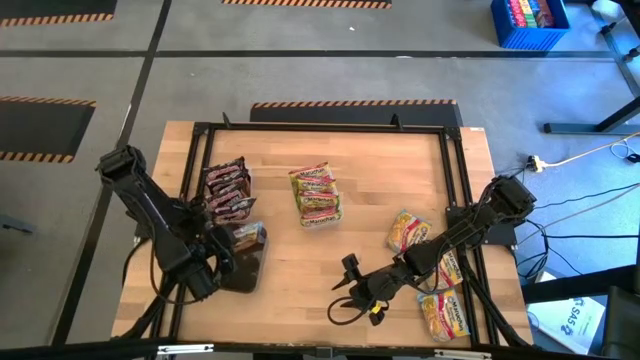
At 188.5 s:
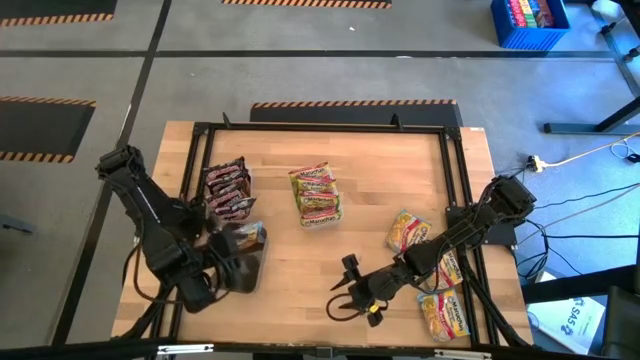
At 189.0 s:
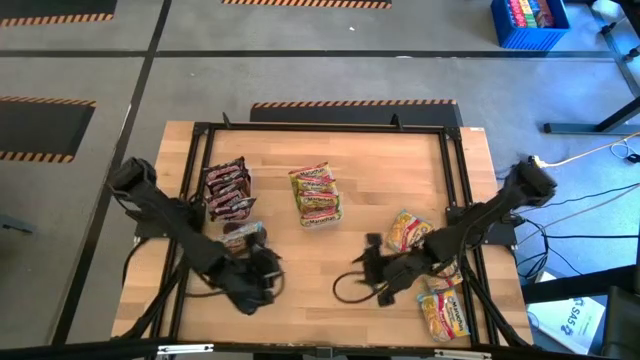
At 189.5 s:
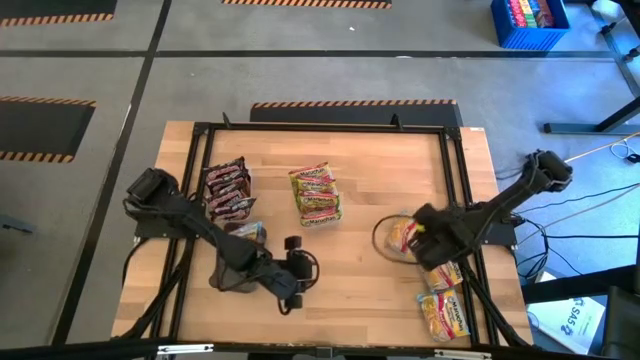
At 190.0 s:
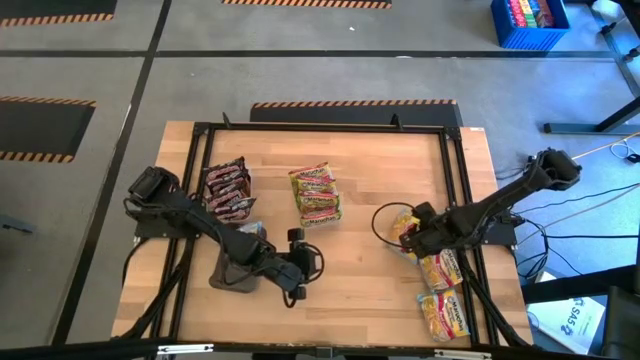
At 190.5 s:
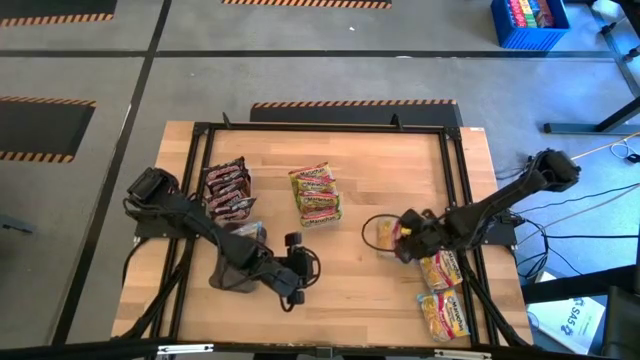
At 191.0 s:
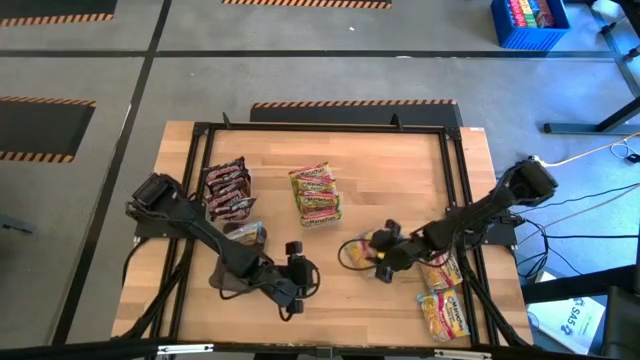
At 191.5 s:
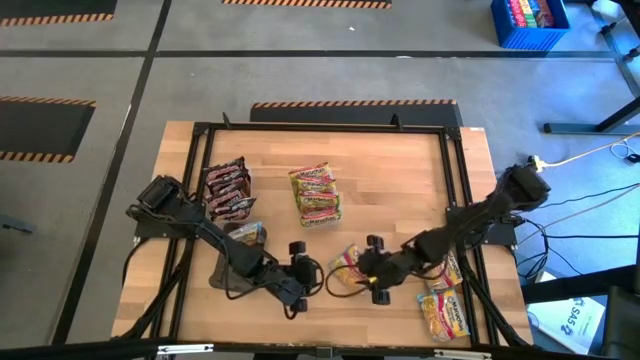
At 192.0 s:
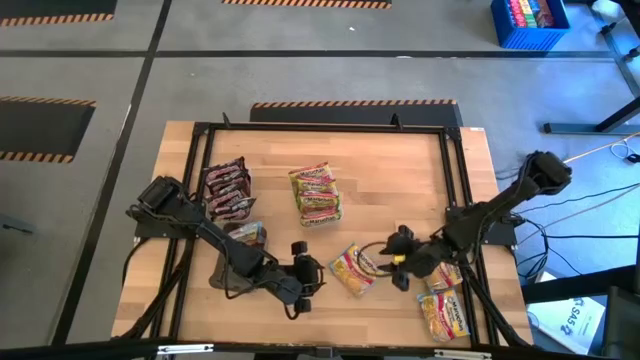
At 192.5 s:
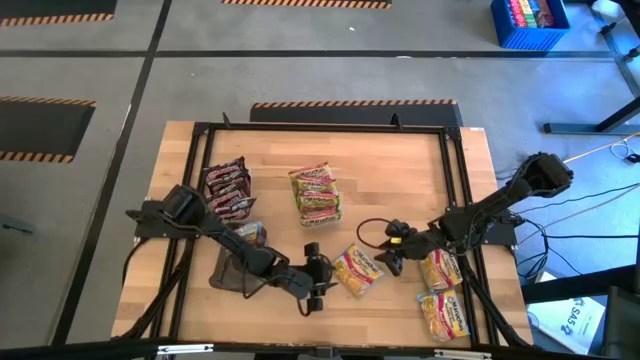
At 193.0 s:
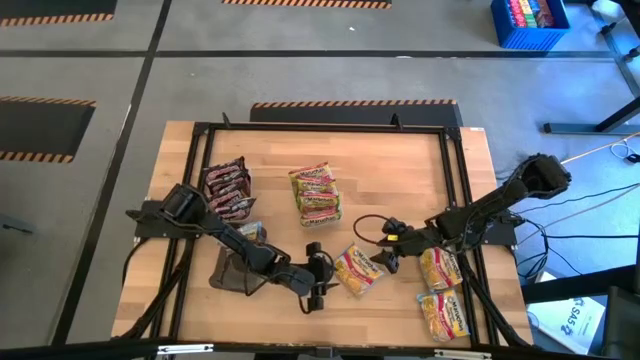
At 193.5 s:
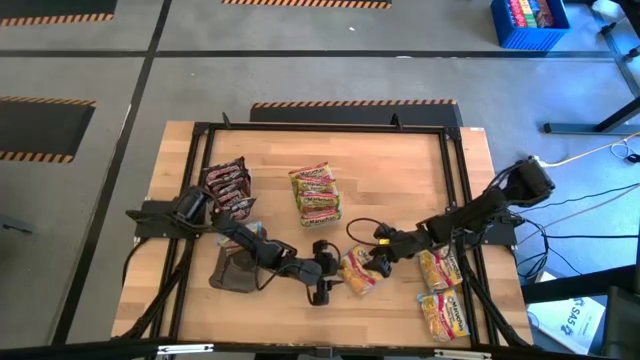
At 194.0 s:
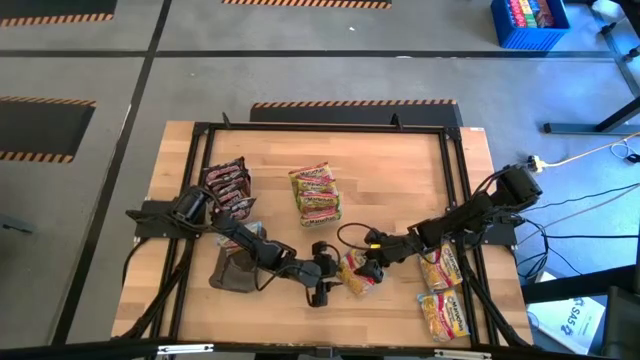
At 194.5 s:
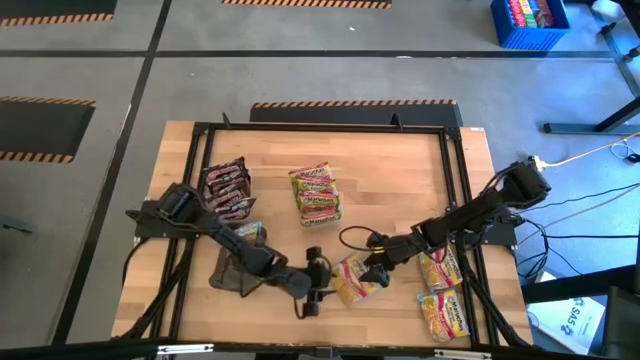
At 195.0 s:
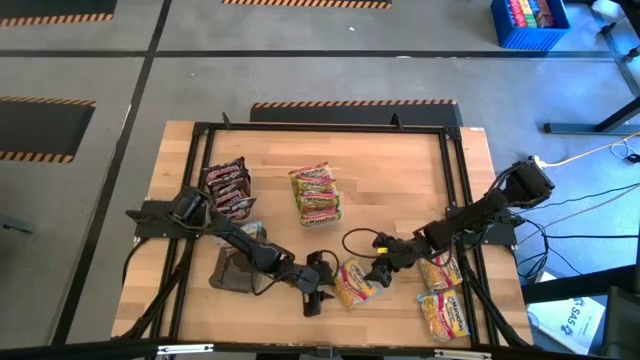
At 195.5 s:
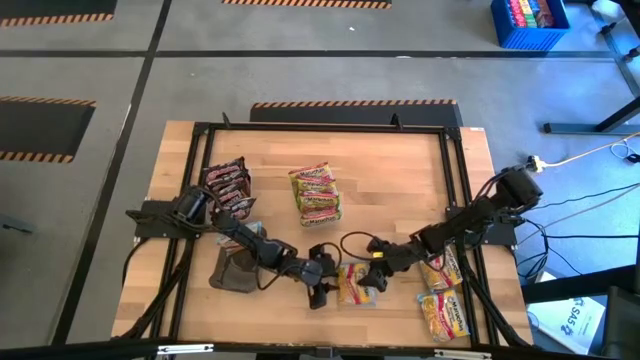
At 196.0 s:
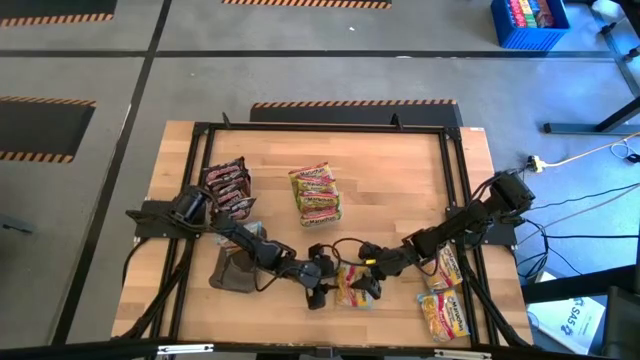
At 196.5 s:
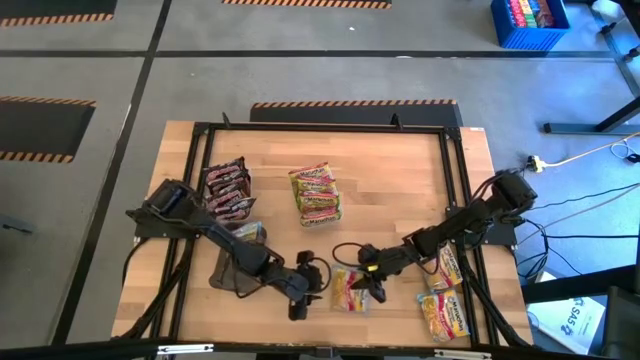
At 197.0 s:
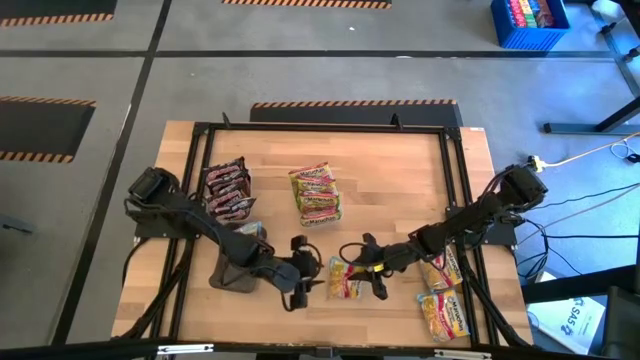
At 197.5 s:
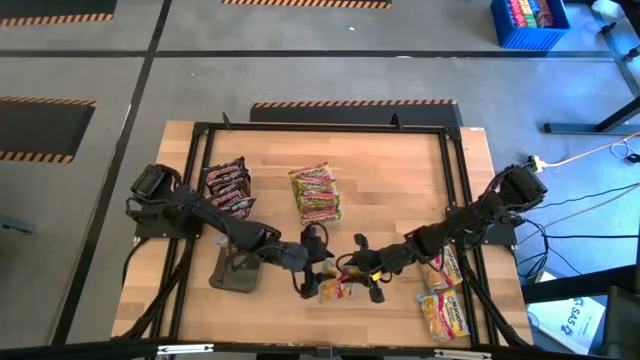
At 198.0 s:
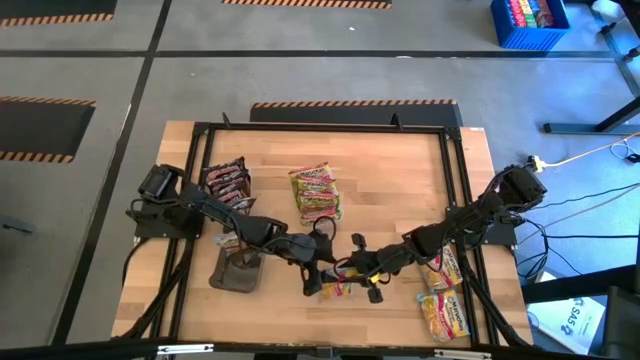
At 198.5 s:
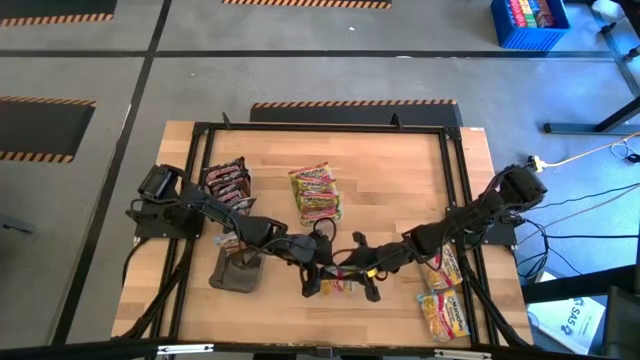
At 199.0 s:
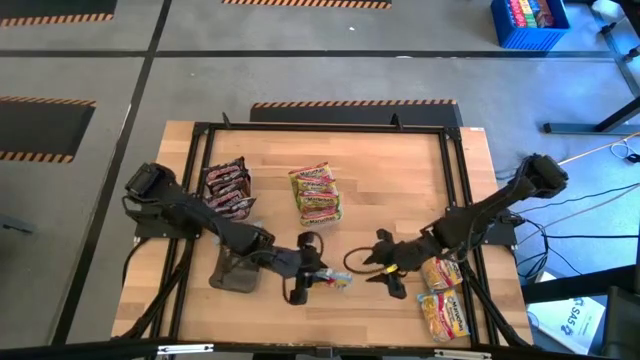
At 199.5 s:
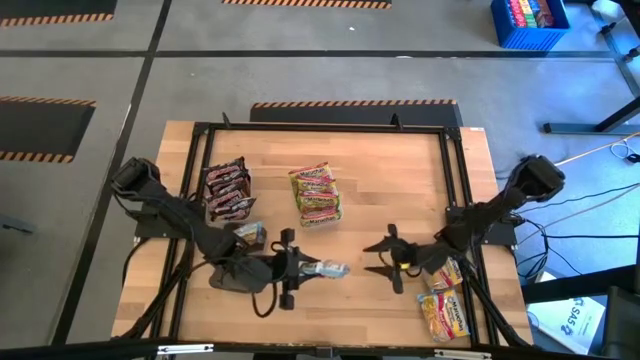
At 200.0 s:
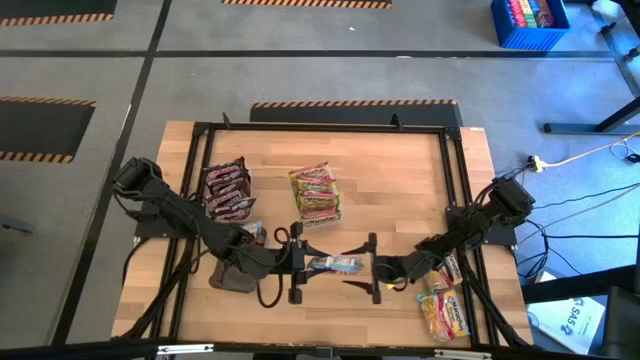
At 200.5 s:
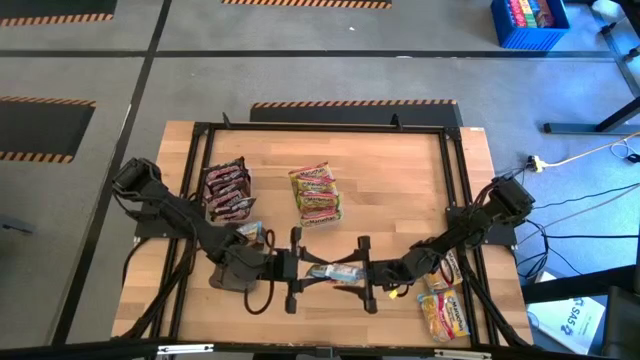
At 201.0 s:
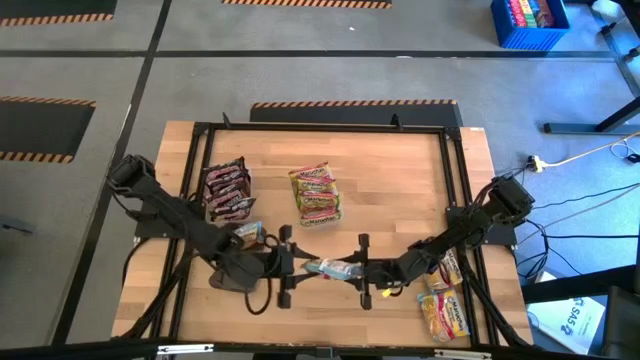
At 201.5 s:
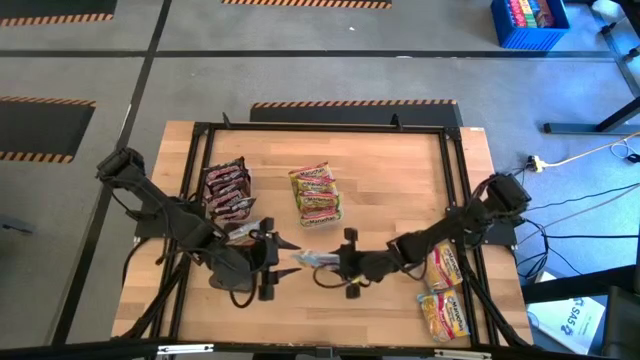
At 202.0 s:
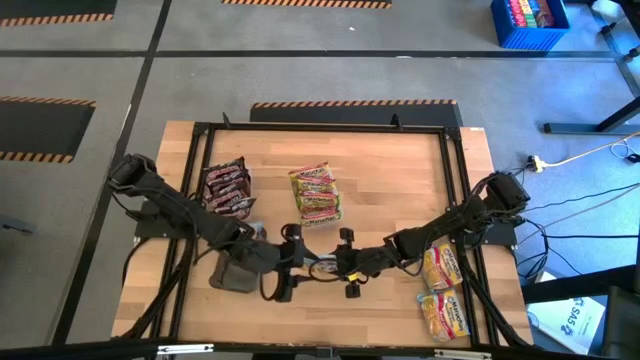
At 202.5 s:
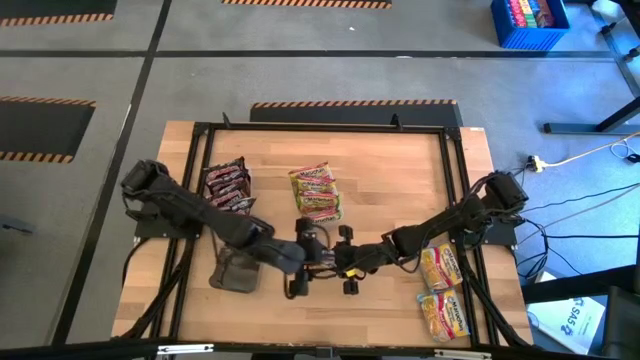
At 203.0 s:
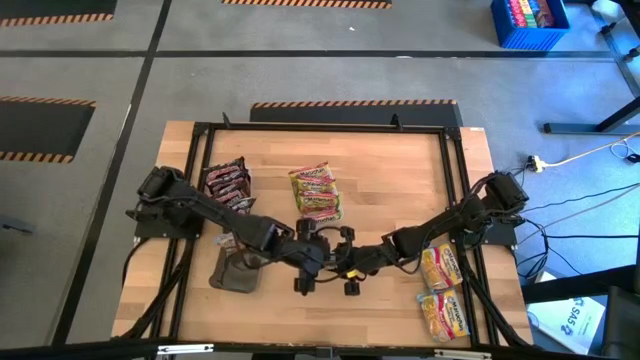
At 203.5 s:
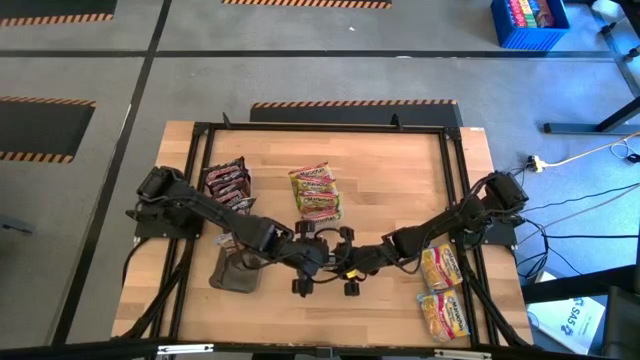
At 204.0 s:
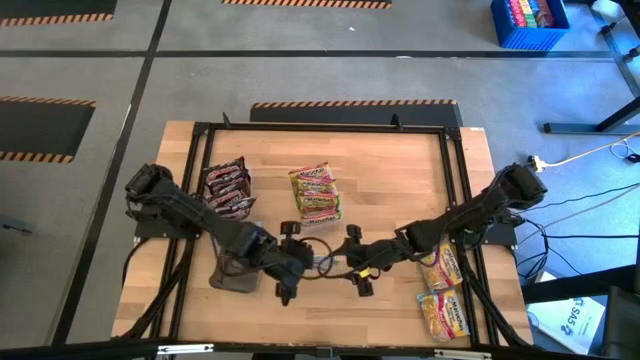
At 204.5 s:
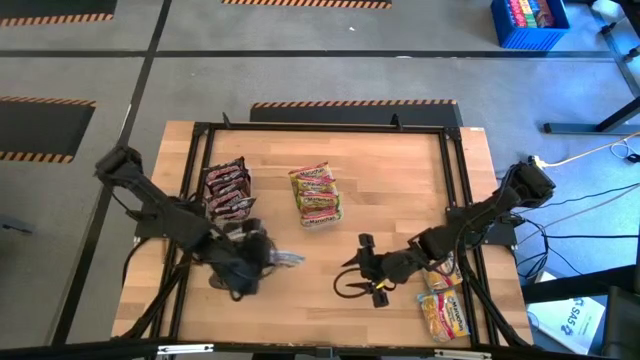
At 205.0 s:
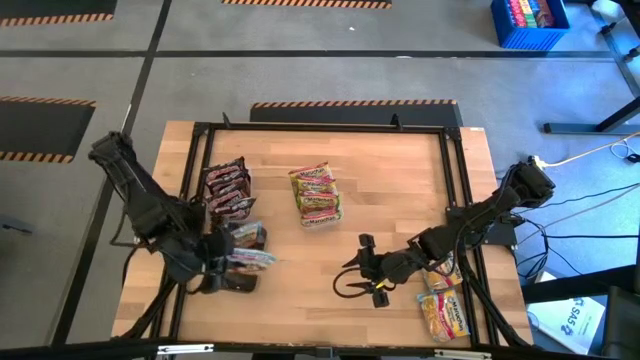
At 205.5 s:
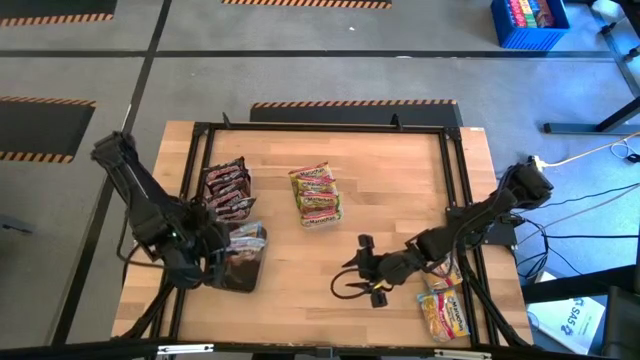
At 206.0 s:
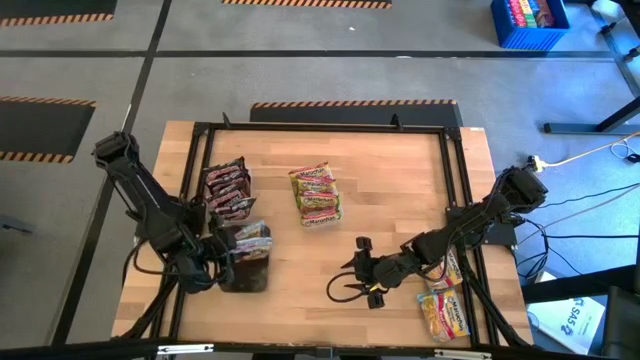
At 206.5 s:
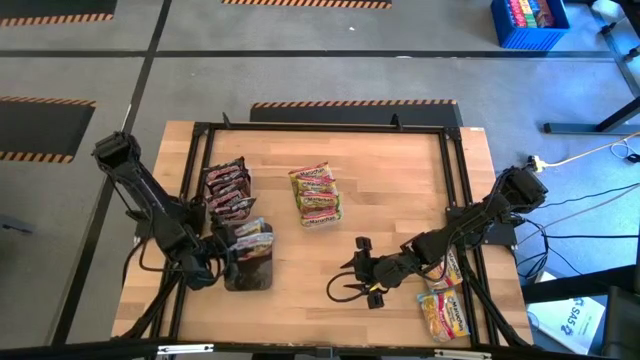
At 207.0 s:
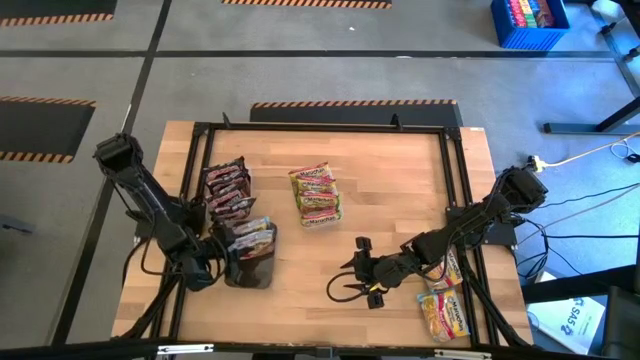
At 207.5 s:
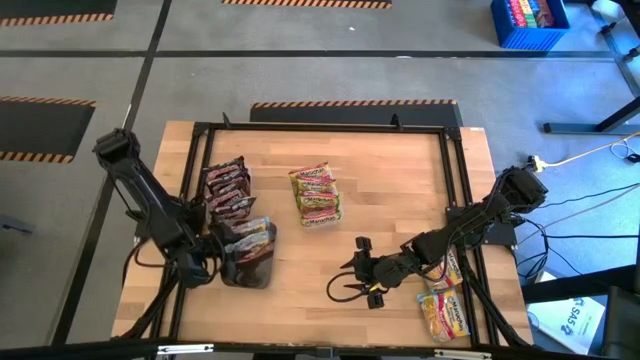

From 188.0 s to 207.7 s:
Task: Sort Maruchan noodles
Put the blue noodle pack into the black bin

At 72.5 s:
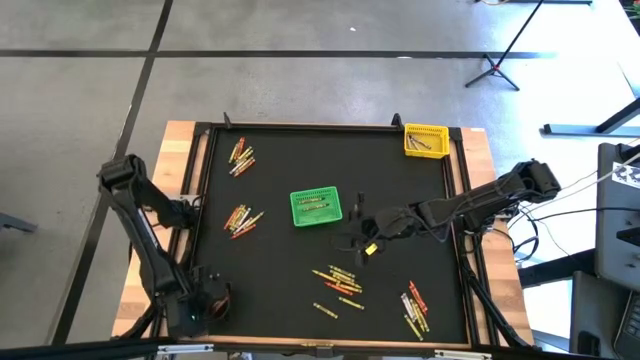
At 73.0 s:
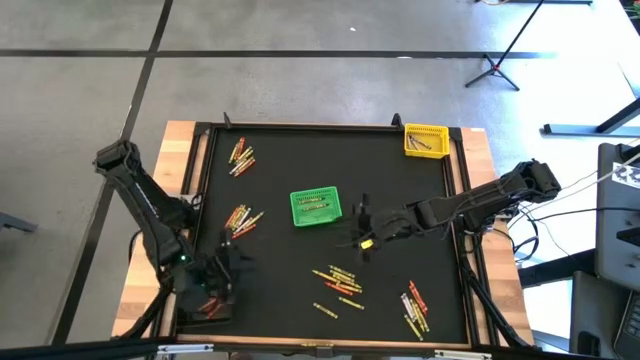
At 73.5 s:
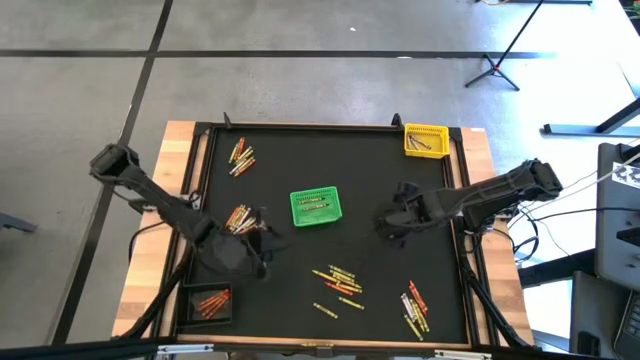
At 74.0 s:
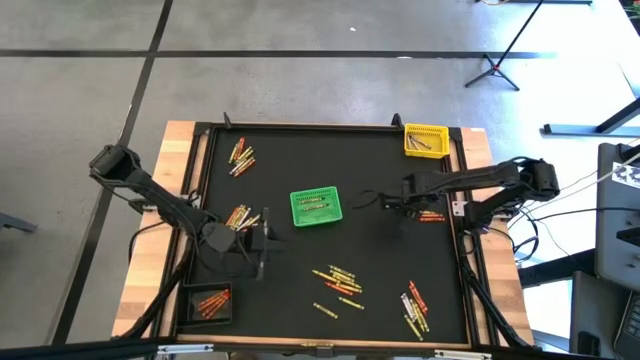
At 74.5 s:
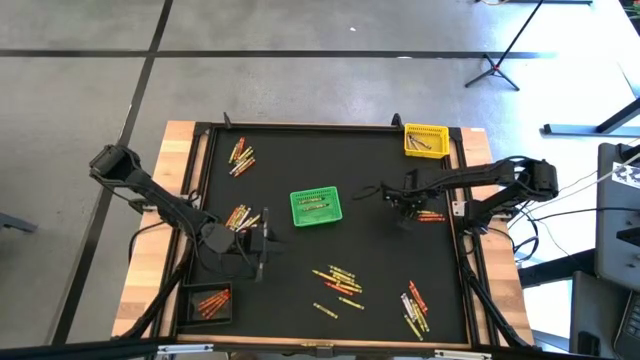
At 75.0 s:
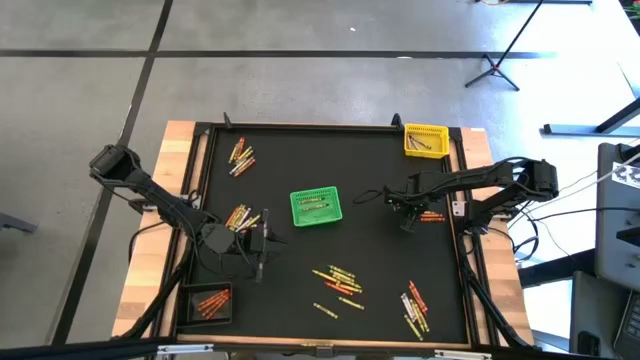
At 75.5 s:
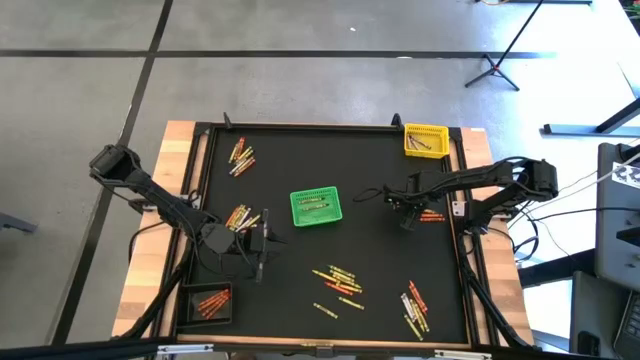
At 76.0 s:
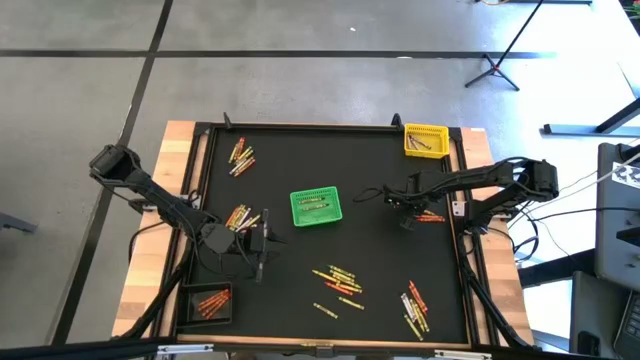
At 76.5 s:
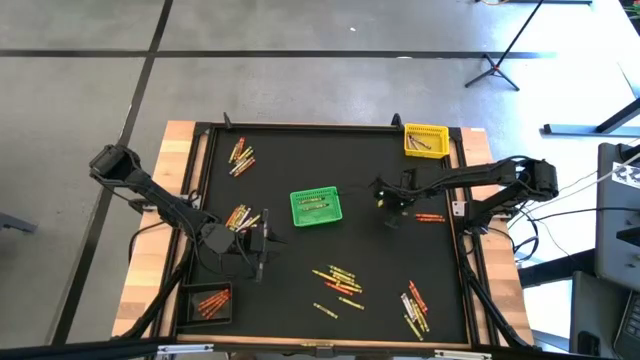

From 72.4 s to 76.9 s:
Task: Sort crayons
Put the green crayon into the green bin
